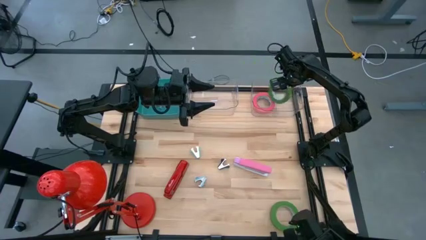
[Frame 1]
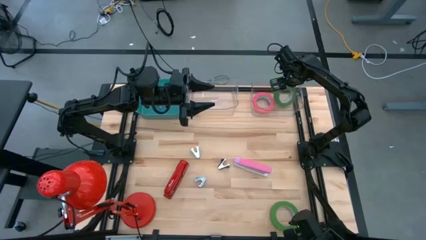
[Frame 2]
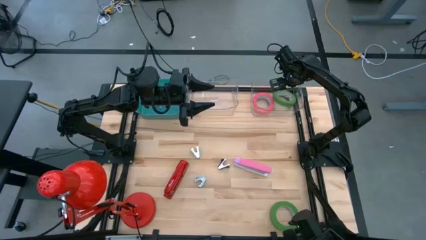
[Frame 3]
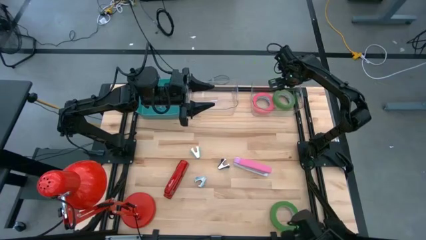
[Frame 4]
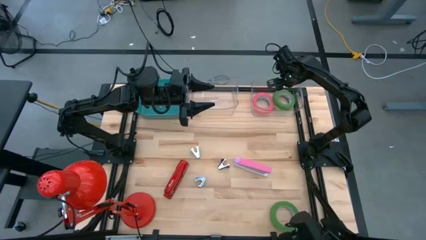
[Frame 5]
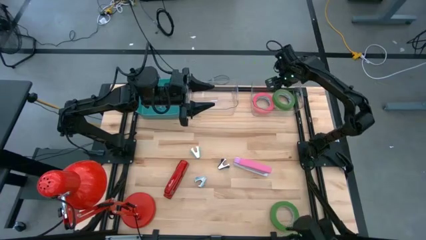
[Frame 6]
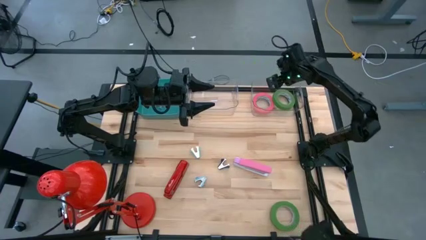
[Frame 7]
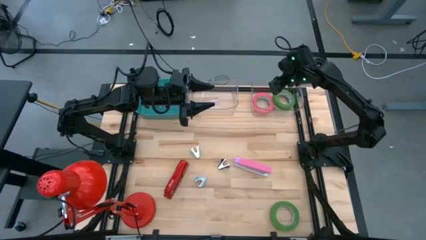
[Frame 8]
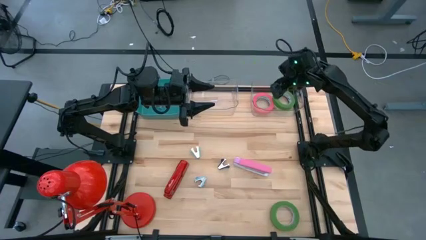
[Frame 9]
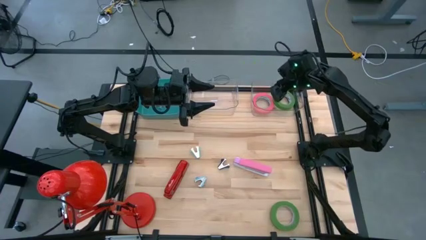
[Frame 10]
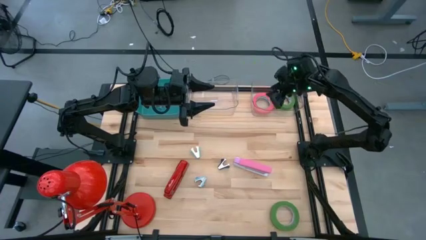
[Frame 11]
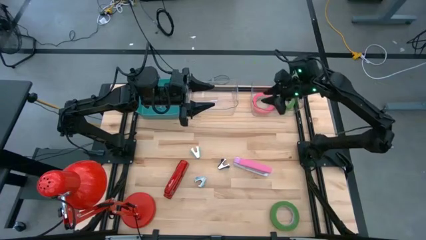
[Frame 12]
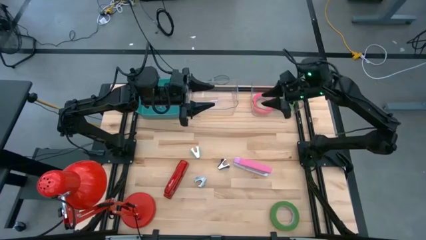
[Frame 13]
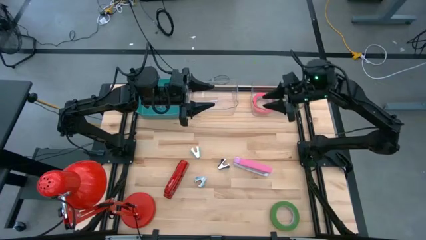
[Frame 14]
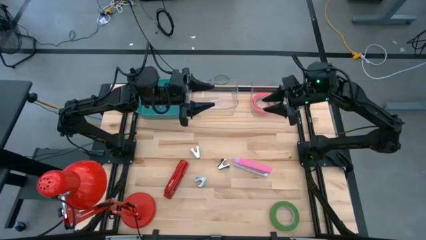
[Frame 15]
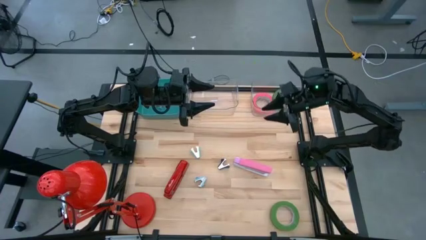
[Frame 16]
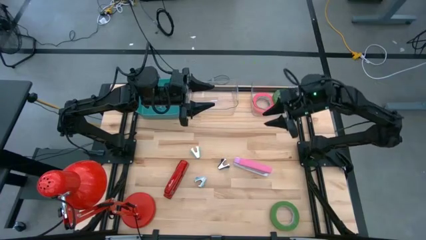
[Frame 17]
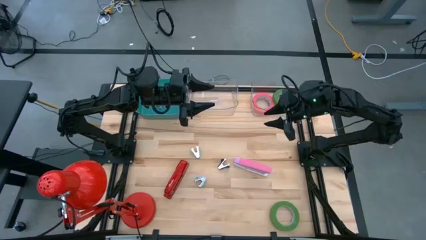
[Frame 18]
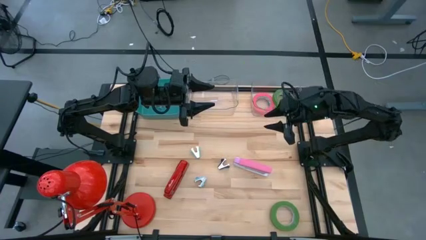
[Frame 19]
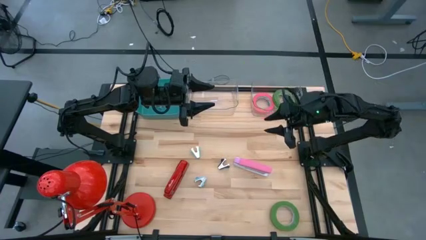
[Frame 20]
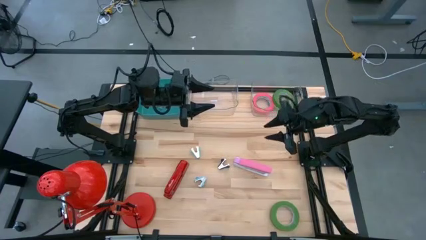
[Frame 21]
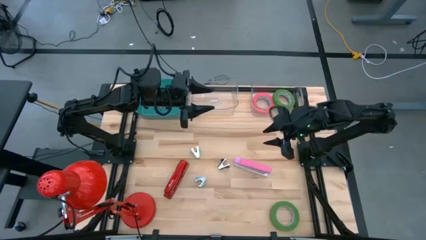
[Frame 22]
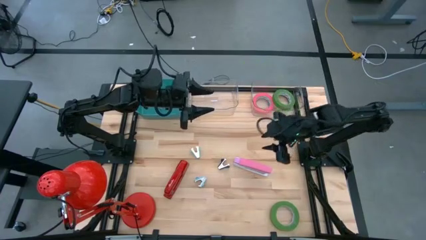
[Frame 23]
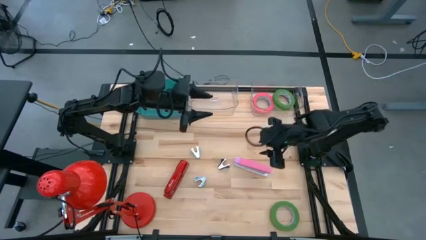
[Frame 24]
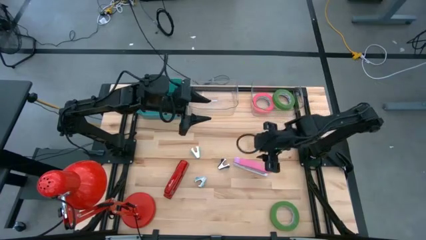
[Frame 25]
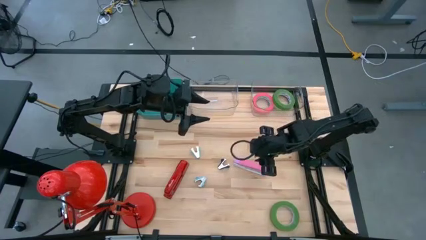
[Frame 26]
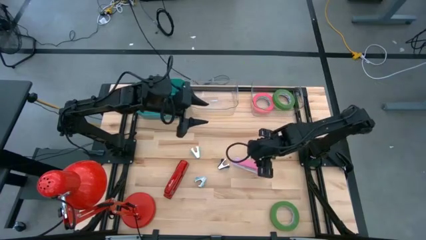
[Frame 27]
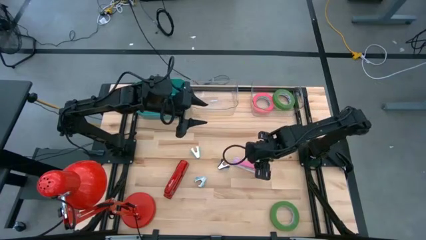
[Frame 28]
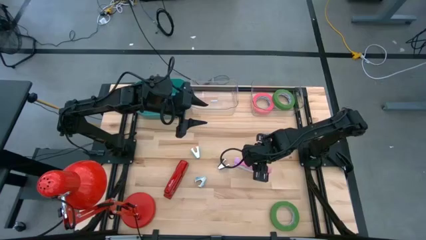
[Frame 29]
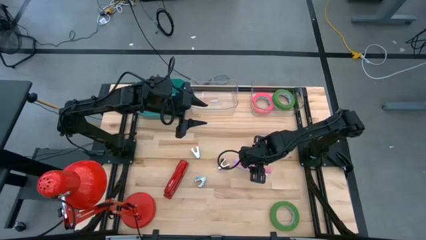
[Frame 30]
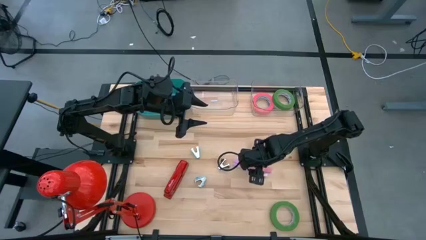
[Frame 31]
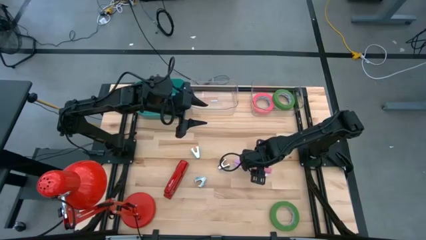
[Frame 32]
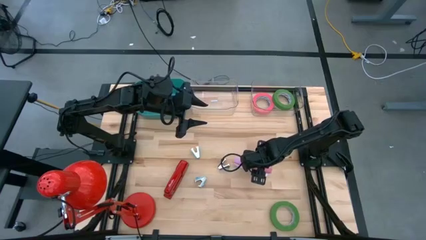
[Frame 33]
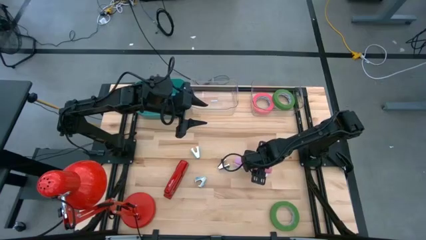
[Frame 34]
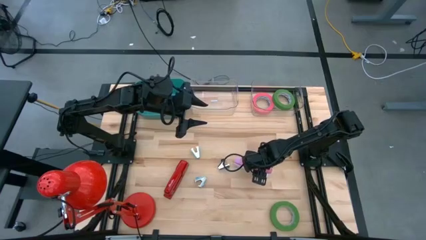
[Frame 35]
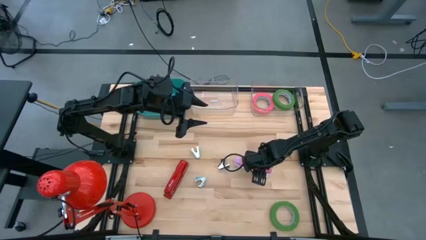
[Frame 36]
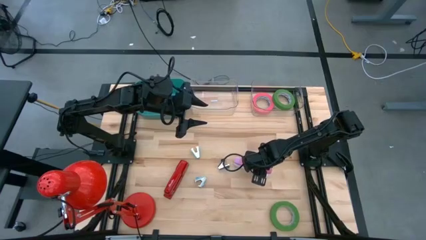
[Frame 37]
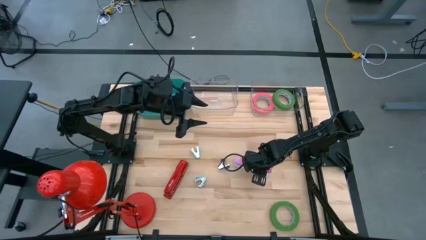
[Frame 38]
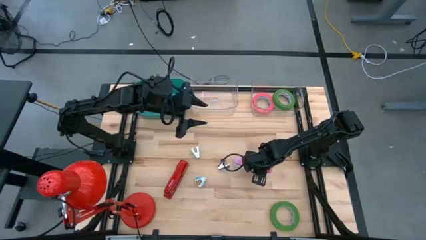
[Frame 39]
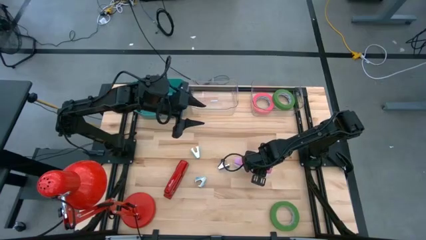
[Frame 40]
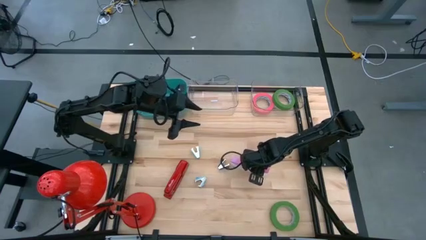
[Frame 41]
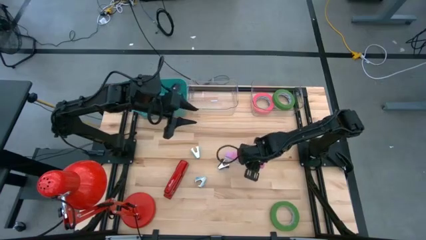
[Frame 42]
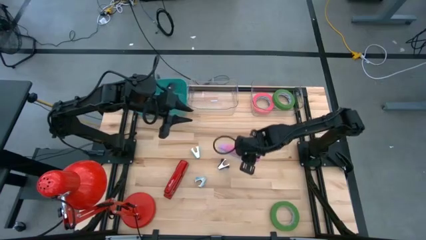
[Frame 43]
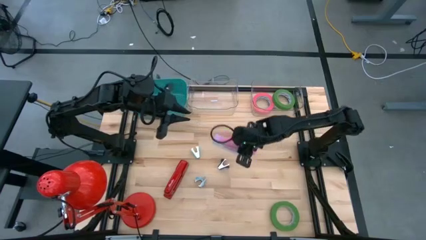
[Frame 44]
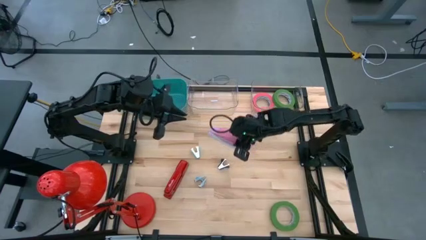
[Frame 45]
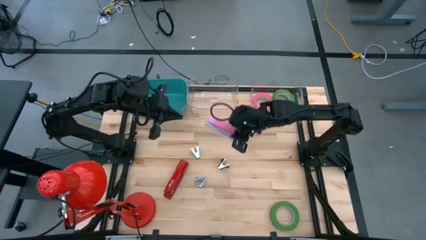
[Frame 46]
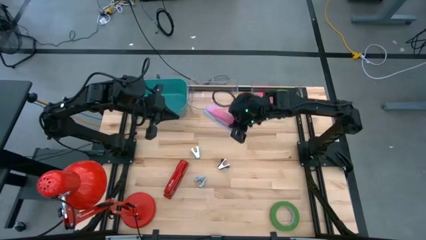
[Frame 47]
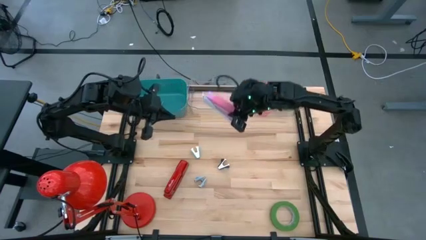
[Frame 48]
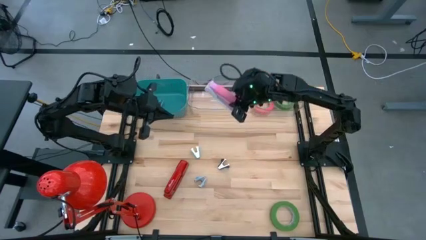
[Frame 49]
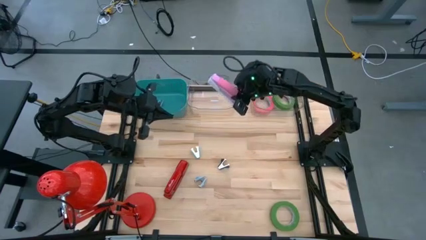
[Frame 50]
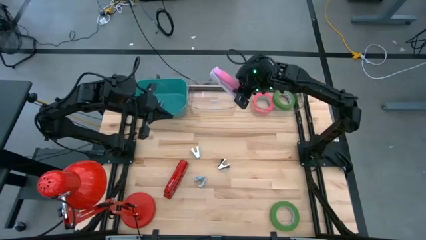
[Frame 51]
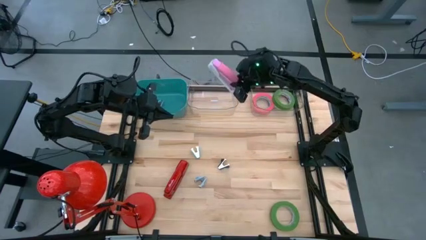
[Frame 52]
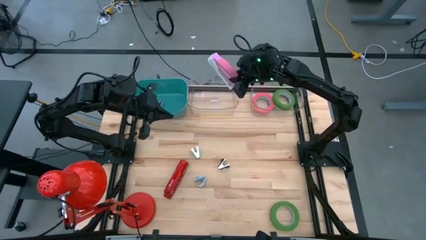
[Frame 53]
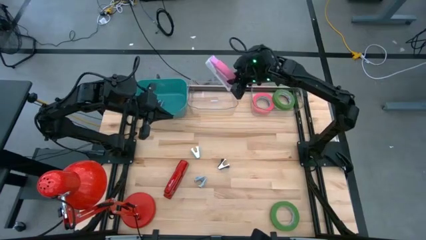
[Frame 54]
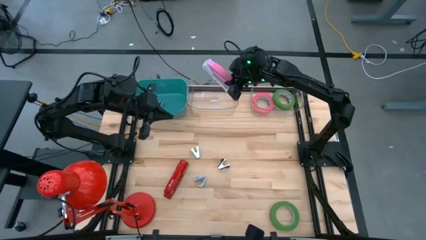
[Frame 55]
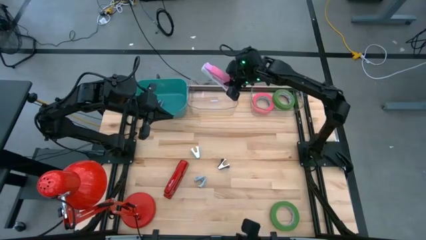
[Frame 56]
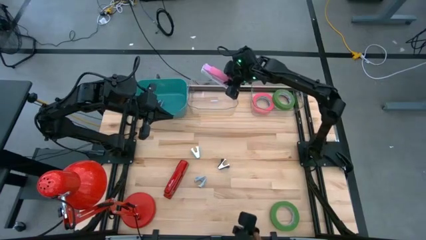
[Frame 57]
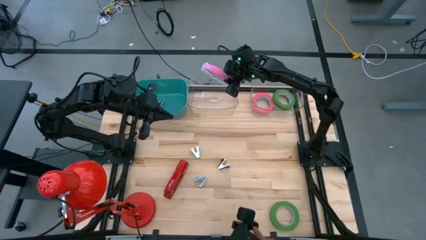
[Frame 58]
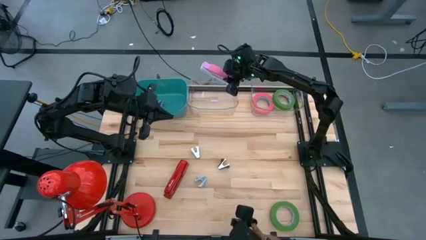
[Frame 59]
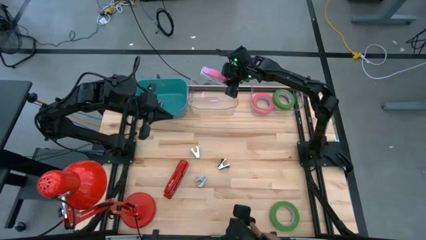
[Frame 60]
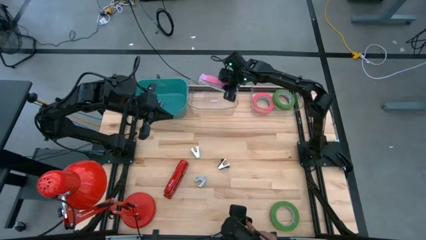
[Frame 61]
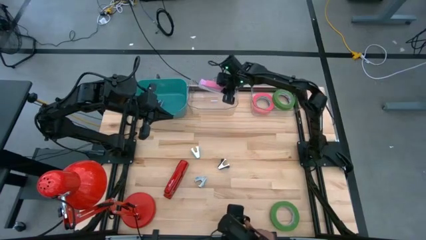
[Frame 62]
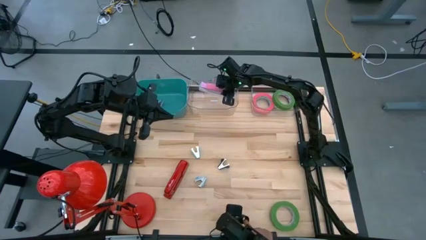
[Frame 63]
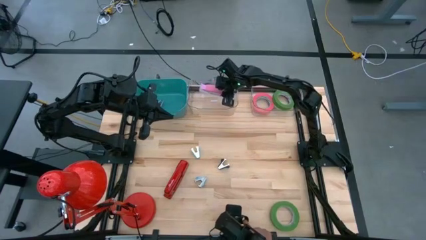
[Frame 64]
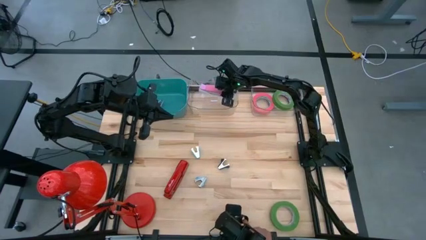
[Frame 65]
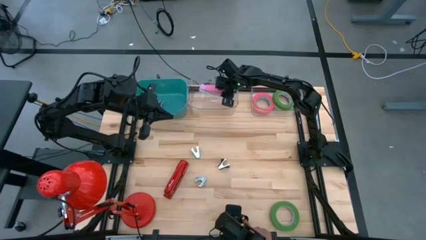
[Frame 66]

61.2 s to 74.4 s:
Task: Pick and place Stapler, Stapler remover, tape
Put the pink stapler into the left transparent bin
